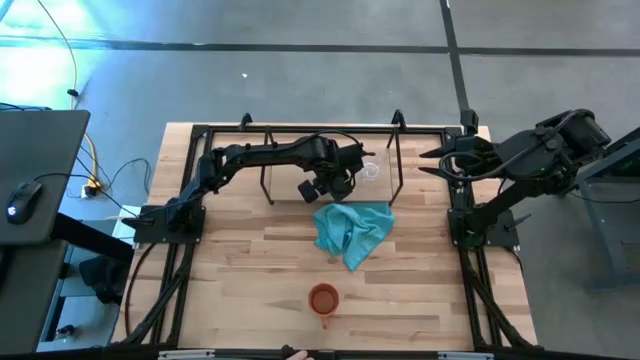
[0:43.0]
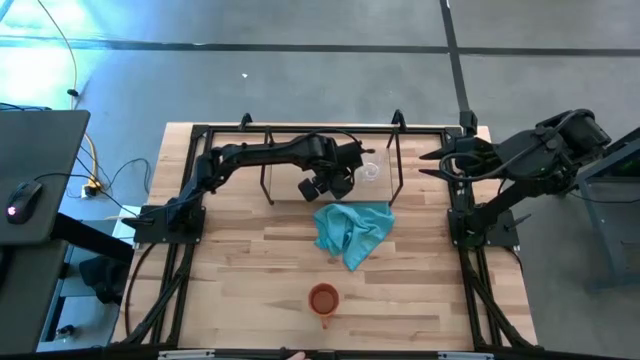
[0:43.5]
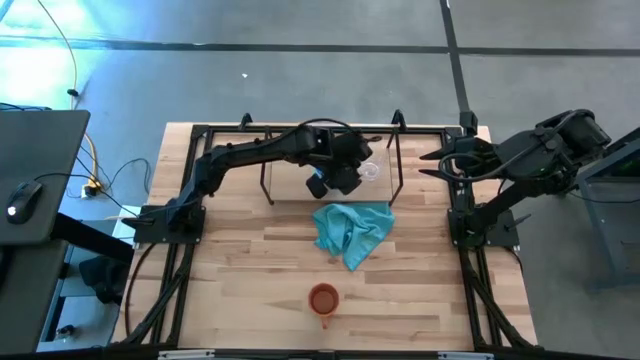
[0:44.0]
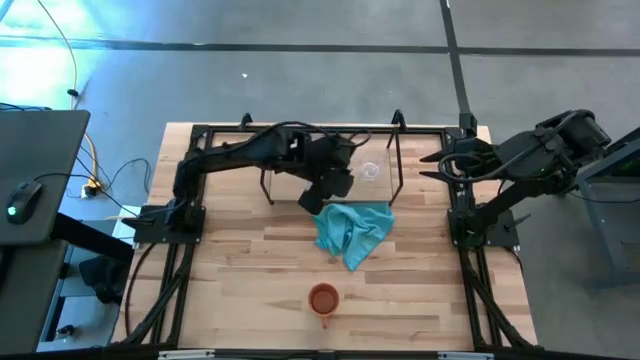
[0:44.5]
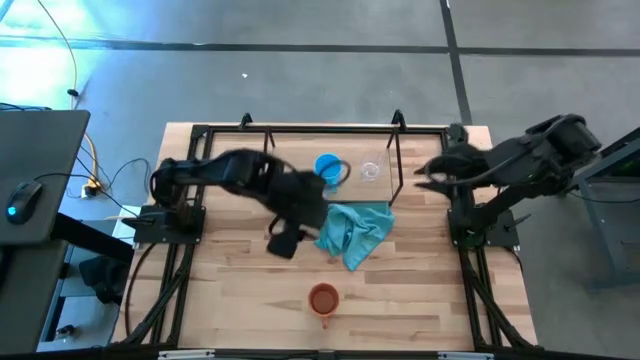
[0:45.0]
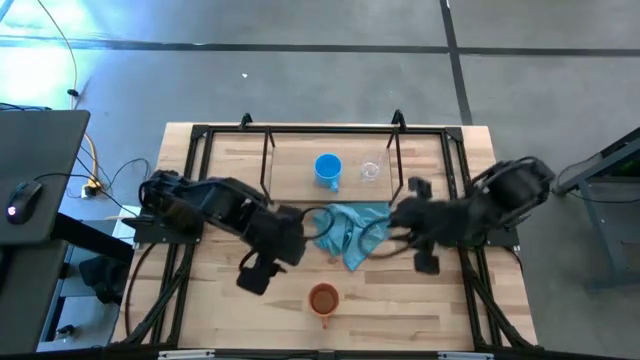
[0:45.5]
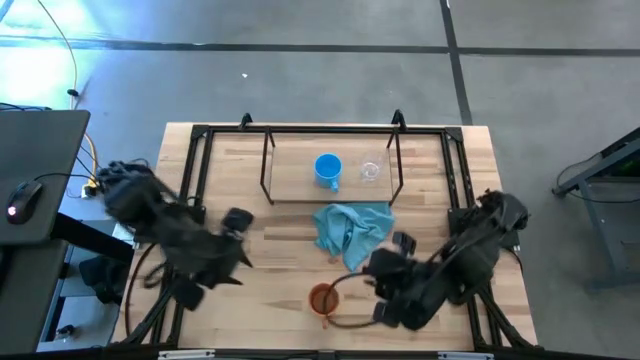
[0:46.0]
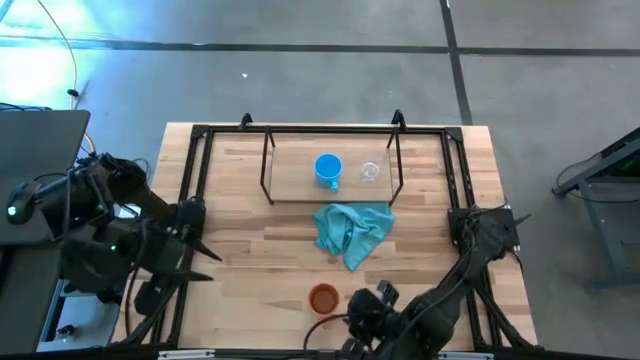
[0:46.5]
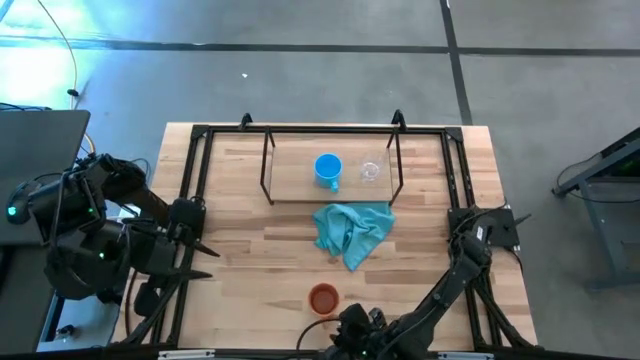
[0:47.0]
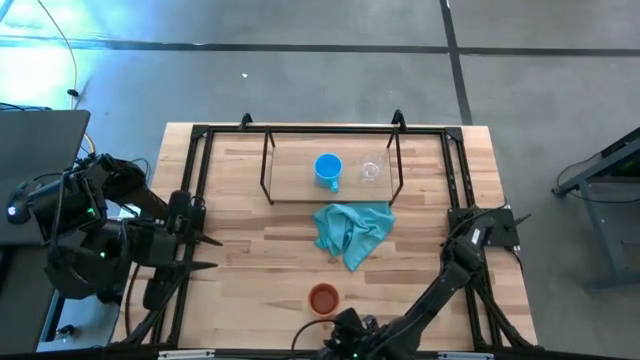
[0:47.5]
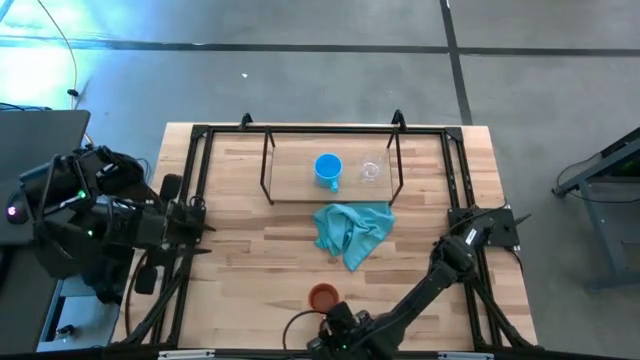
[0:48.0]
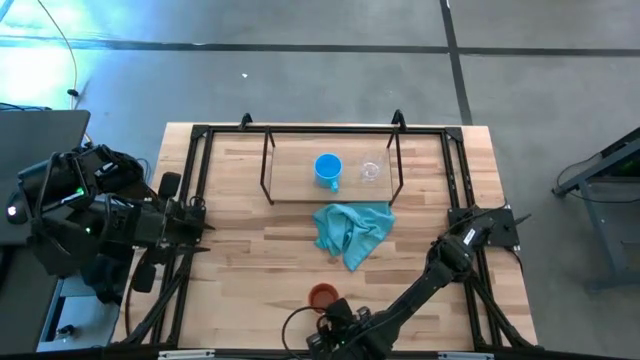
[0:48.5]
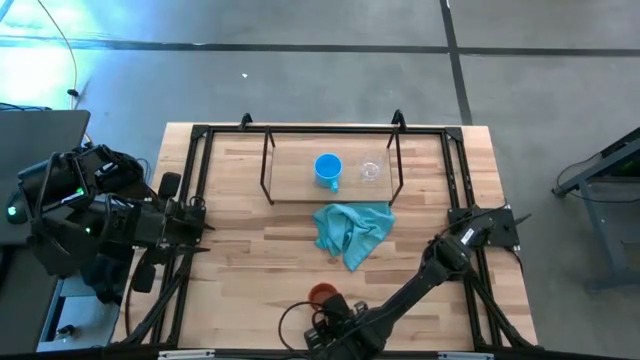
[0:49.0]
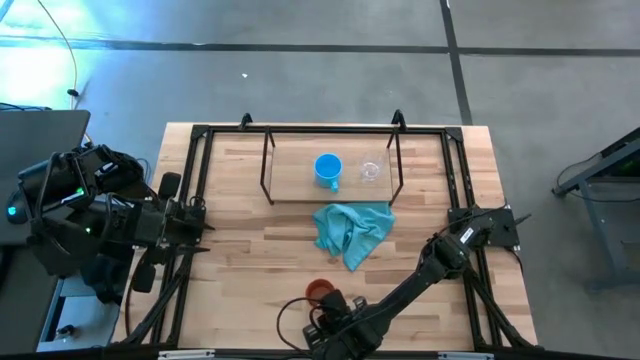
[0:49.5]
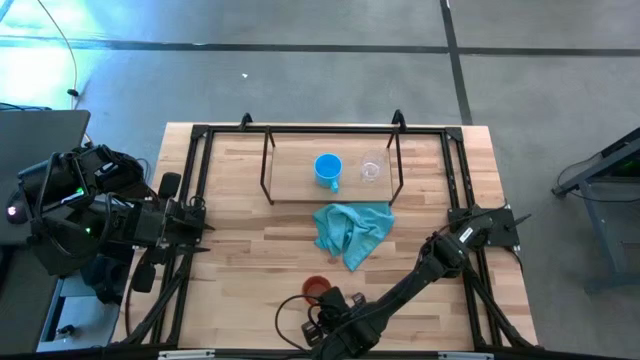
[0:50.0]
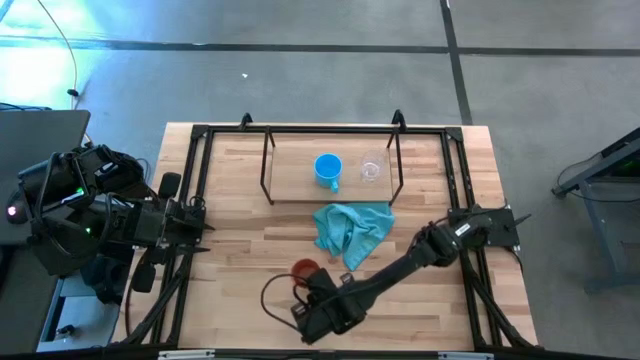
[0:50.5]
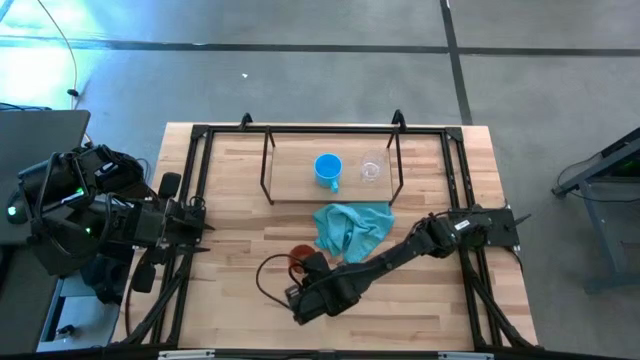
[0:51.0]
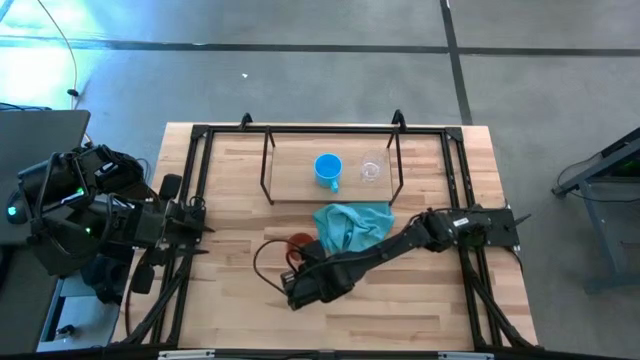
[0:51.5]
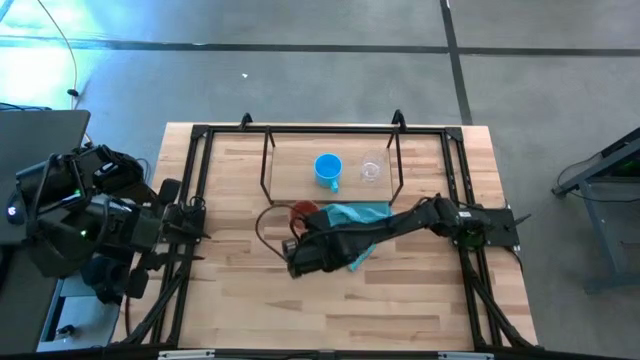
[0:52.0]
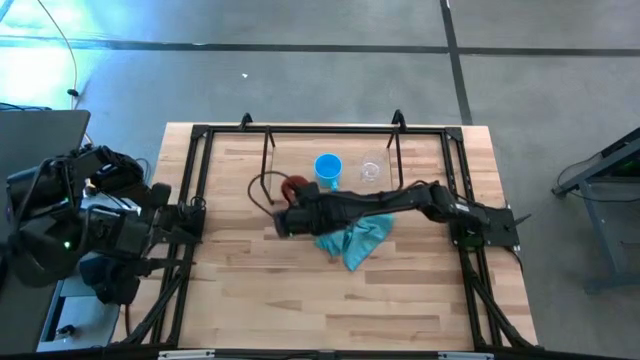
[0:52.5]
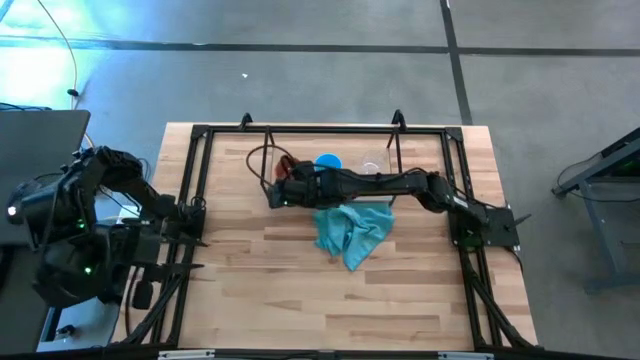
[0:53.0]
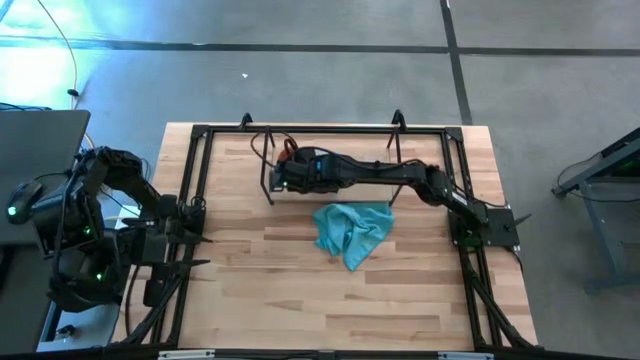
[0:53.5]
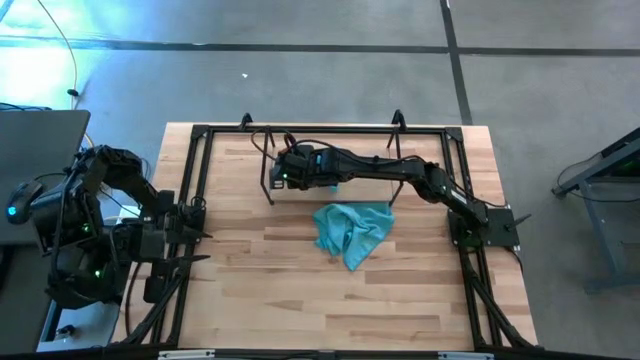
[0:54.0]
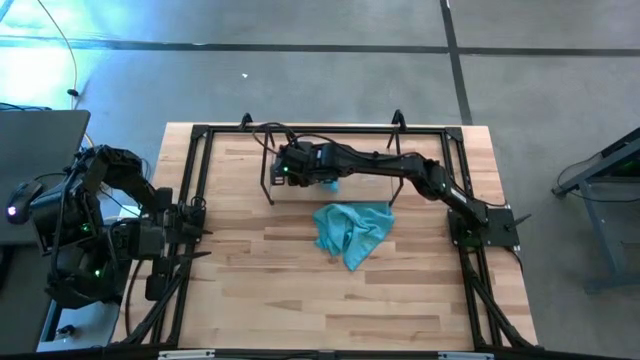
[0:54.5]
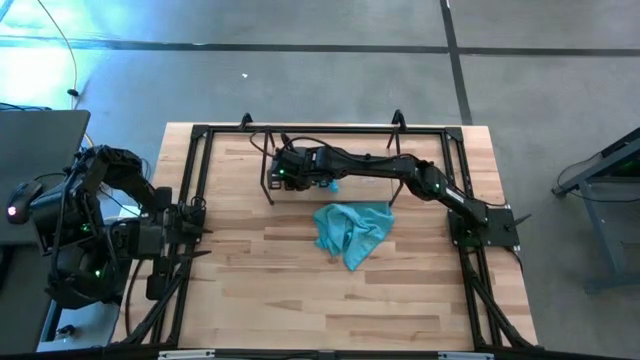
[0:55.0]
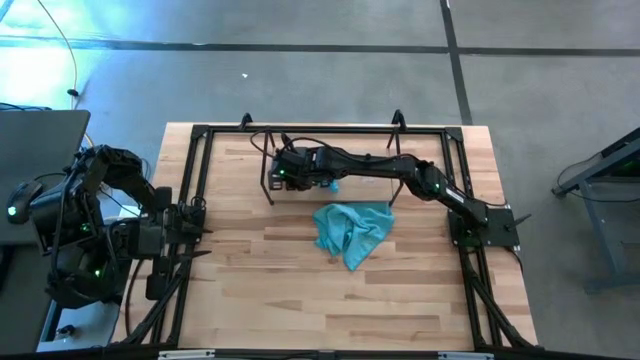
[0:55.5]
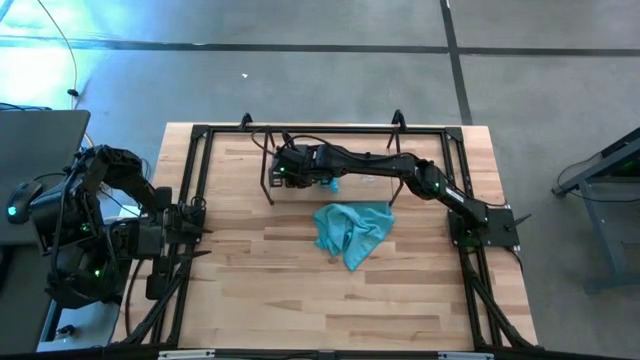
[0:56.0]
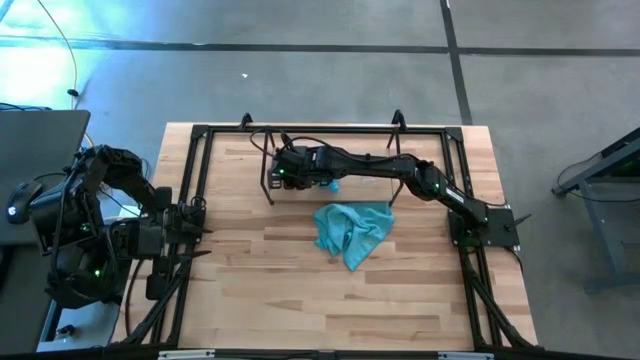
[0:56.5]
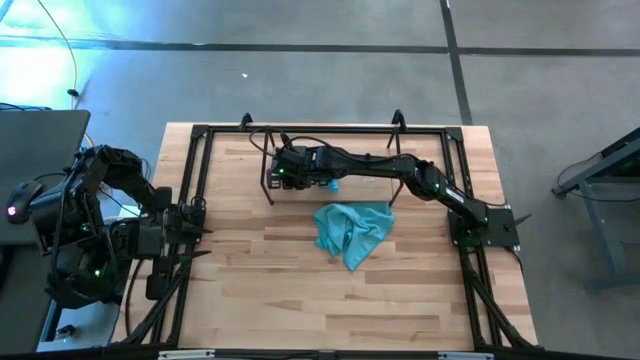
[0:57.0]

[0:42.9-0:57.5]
Task: Stack small to large cups/mugs on shelf
Put the brown mug on the shelf

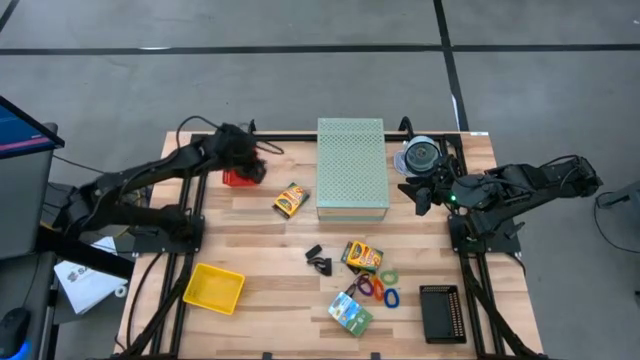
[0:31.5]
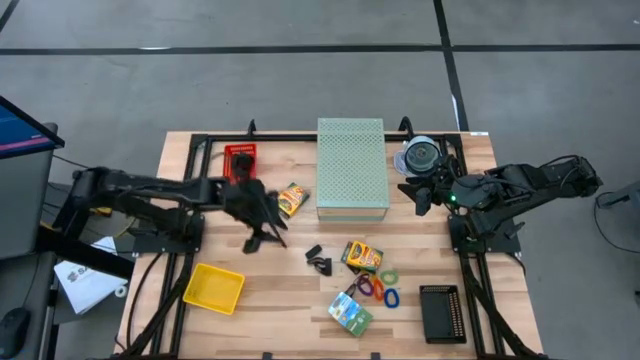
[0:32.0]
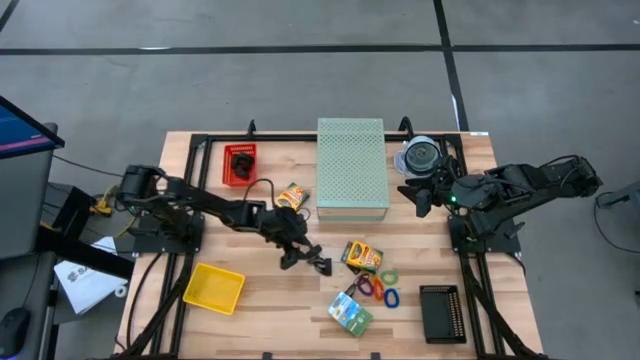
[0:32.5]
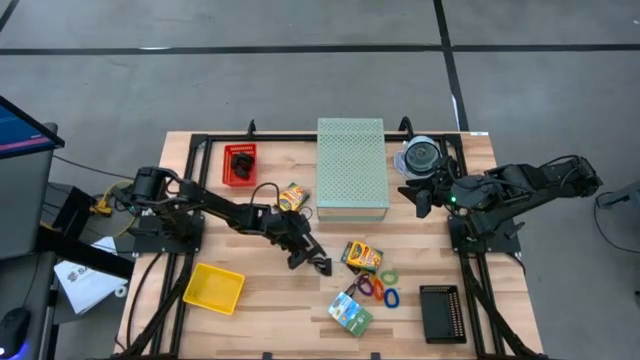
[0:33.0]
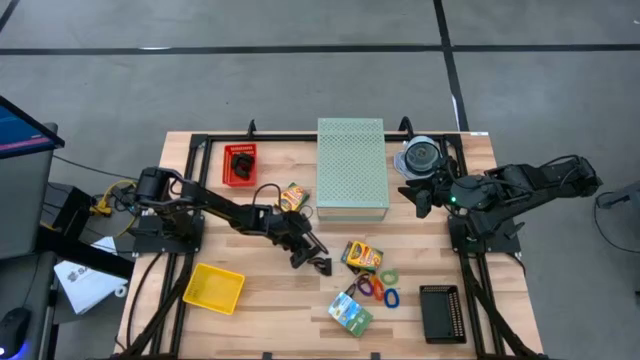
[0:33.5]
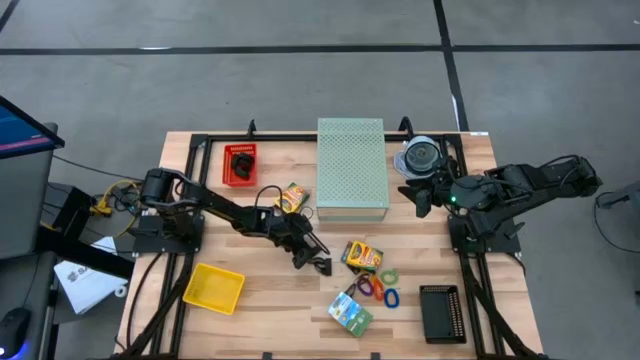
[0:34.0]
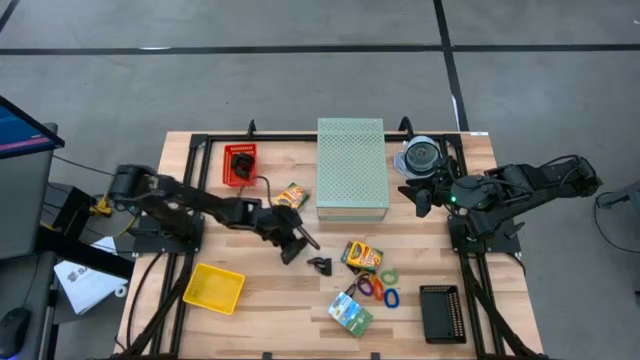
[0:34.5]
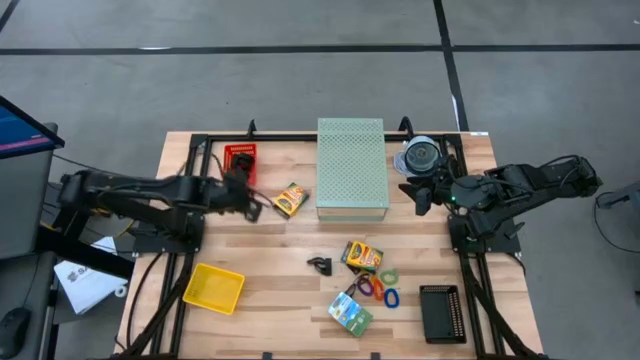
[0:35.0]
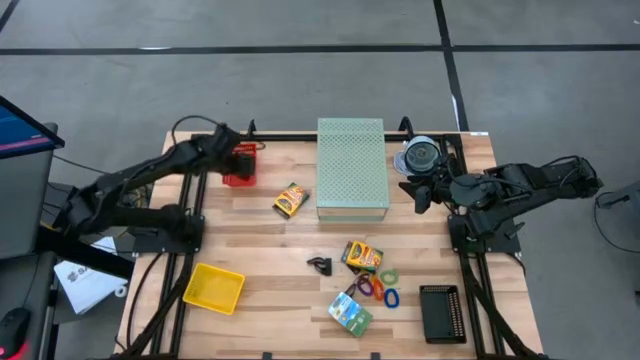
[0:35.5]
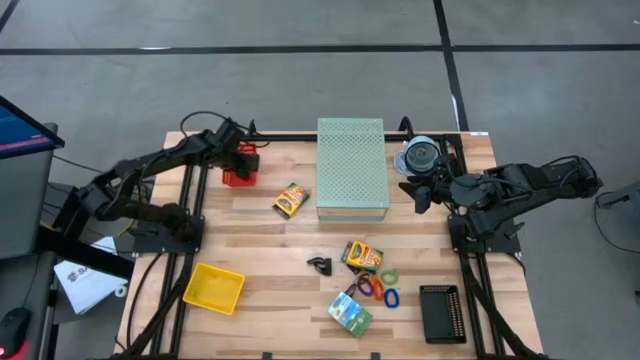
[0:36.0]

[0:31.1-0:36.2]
Task: Pick & Place Office Desk Supplies
Put the black rubber band into the red bin

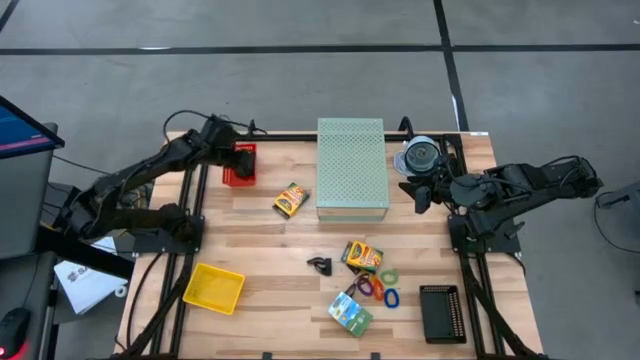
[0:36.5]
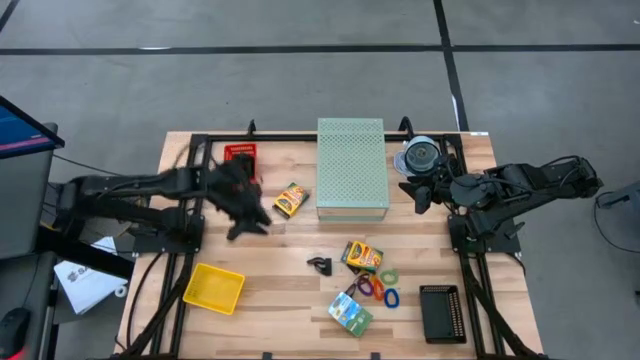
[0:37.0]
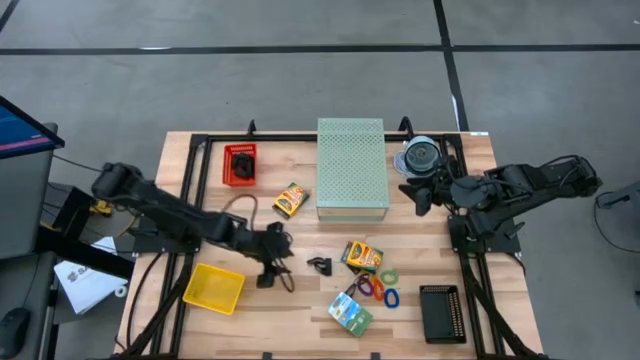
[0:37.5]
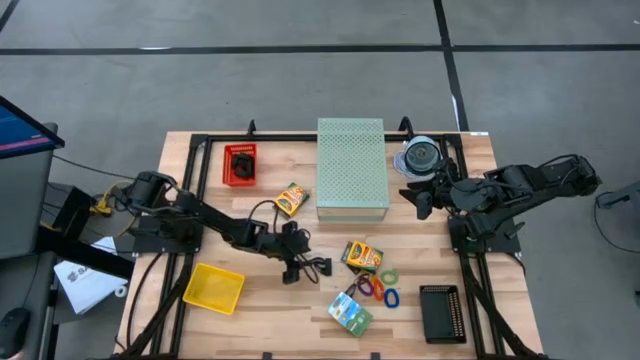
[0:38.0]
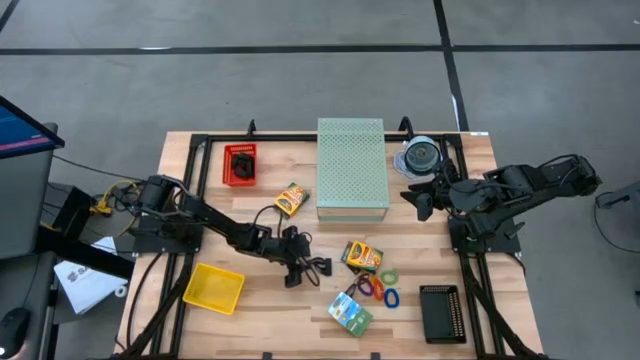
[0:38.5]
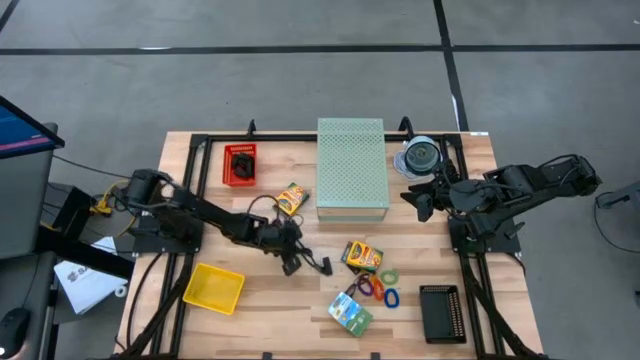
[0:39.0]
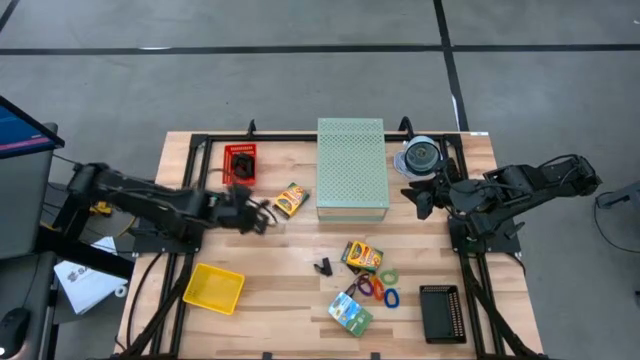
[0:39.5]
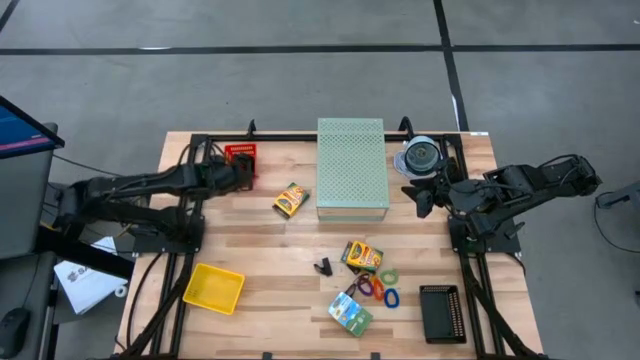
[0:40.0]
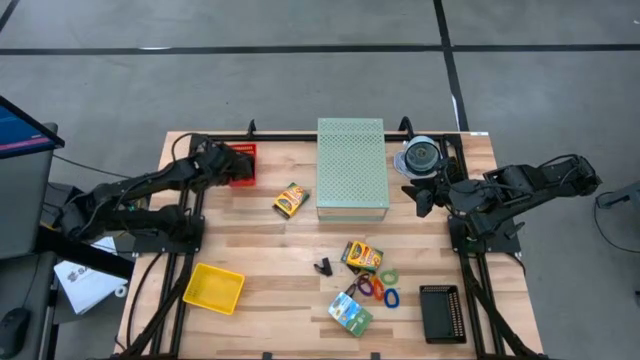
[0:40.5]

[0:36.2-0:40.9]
Put the black rubber band into the red bin
